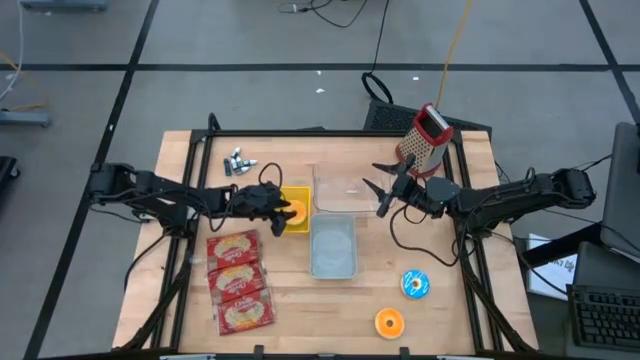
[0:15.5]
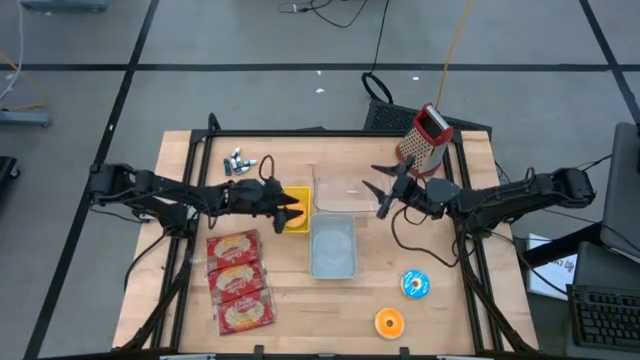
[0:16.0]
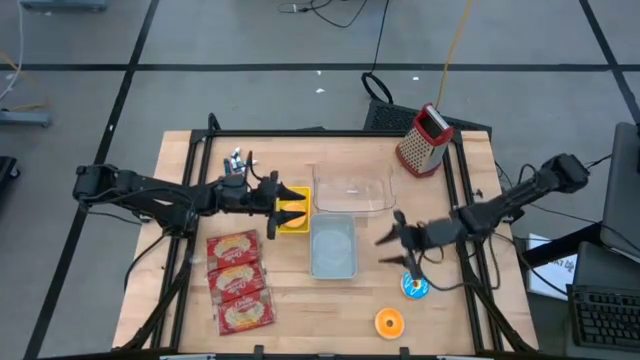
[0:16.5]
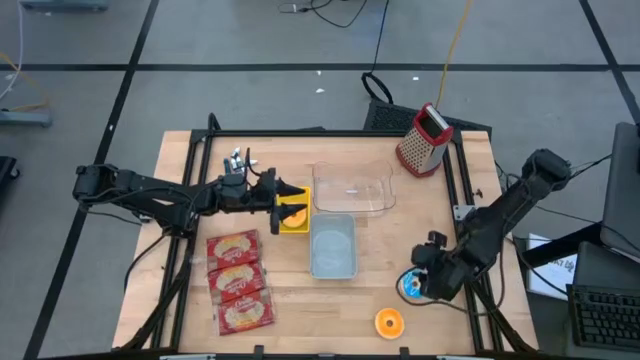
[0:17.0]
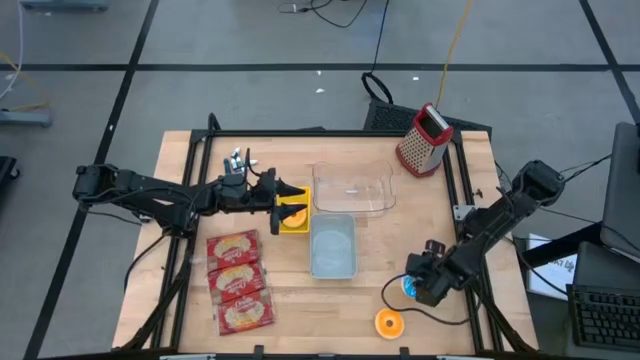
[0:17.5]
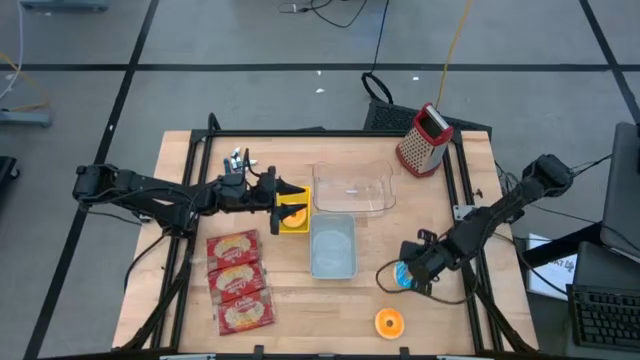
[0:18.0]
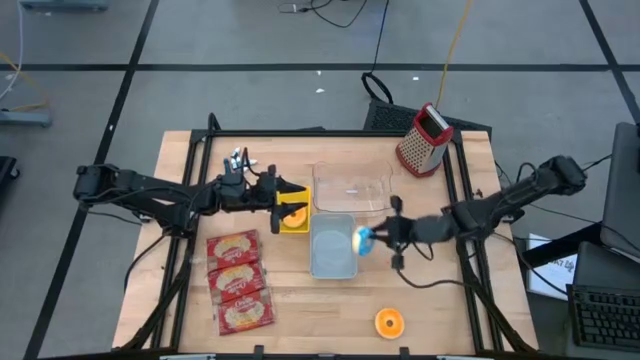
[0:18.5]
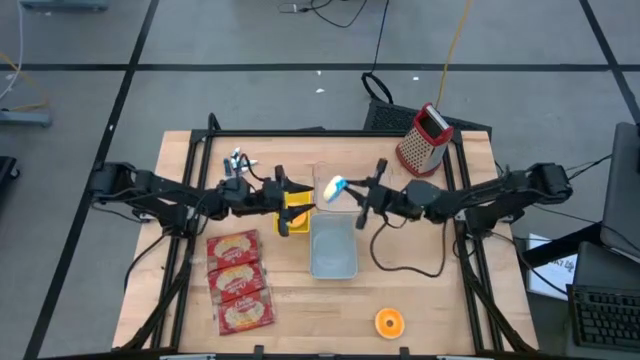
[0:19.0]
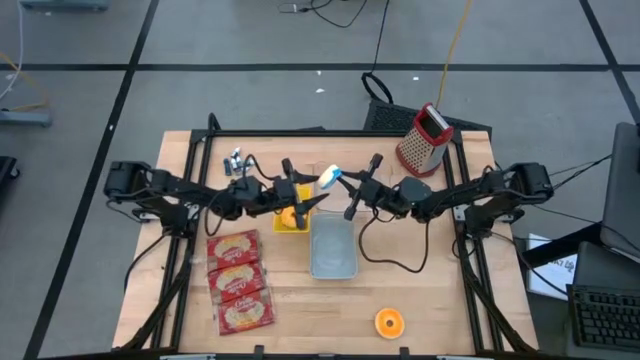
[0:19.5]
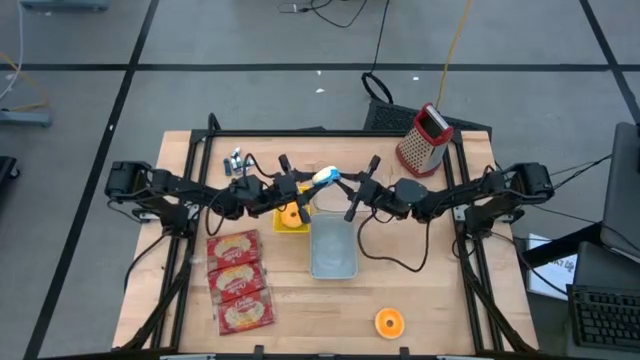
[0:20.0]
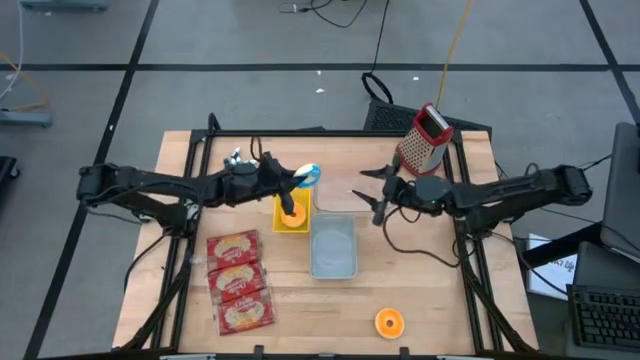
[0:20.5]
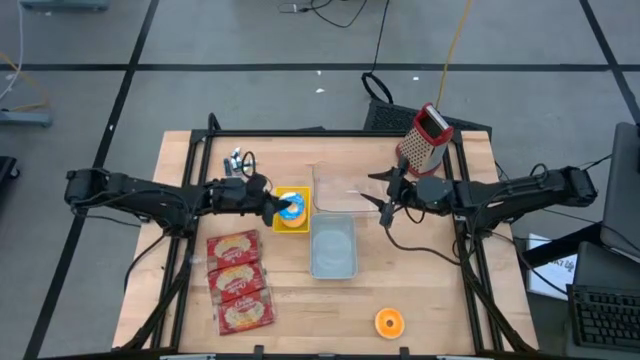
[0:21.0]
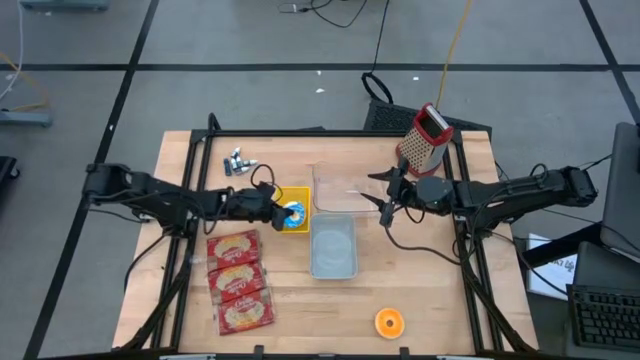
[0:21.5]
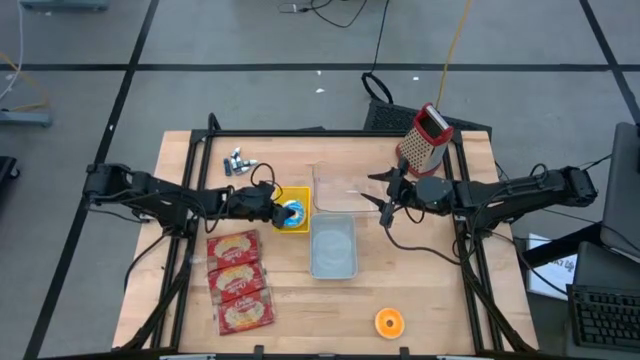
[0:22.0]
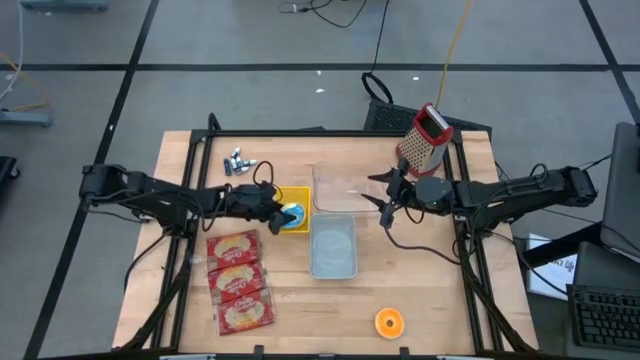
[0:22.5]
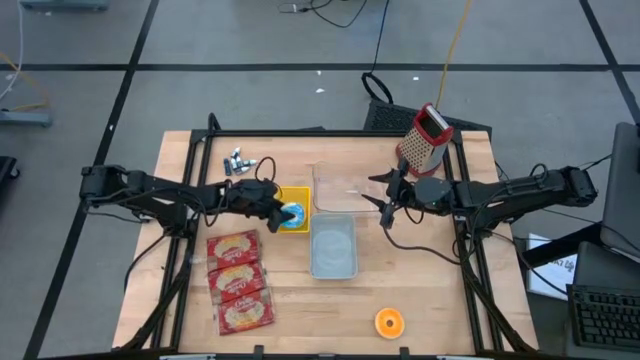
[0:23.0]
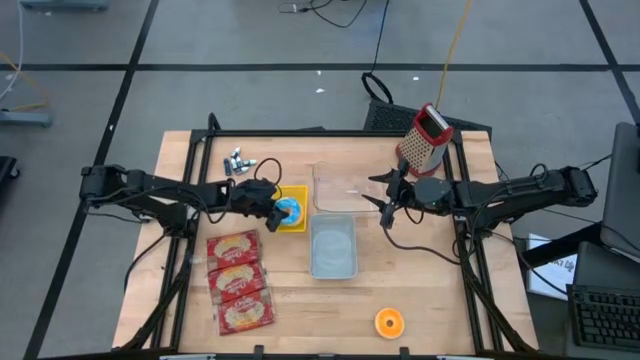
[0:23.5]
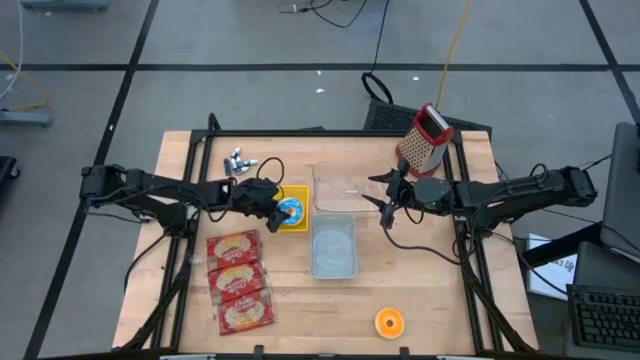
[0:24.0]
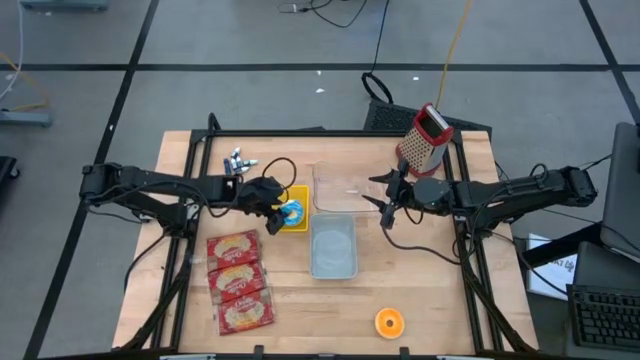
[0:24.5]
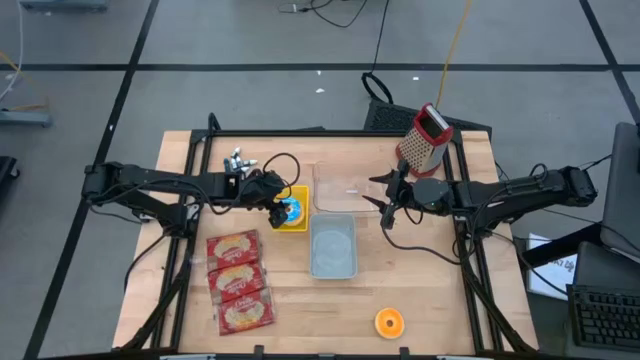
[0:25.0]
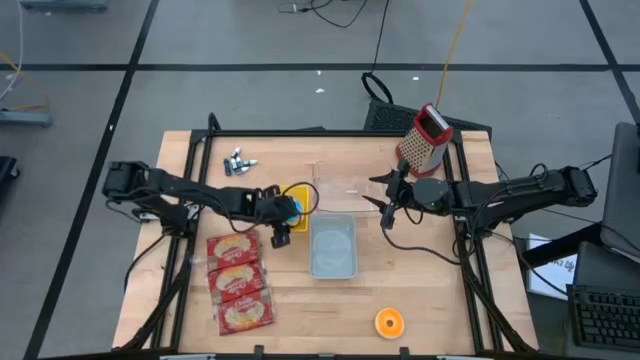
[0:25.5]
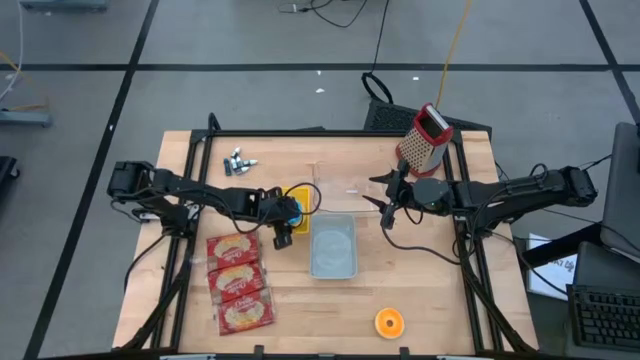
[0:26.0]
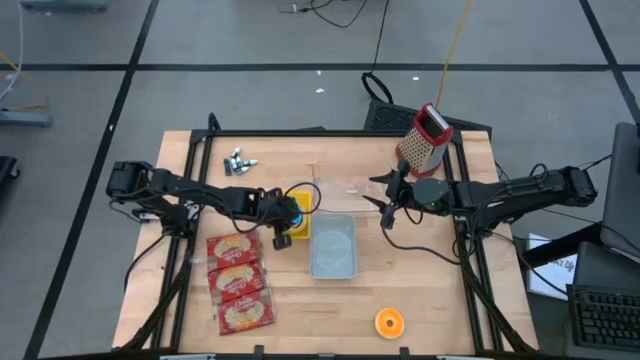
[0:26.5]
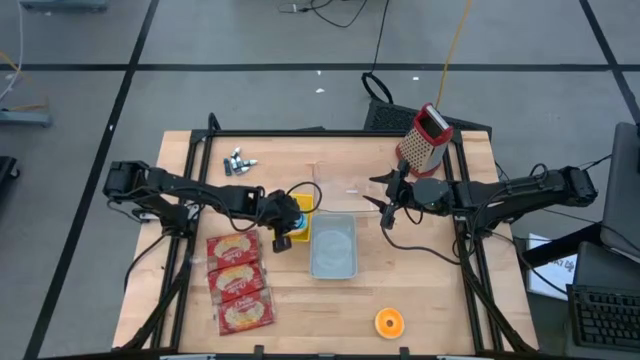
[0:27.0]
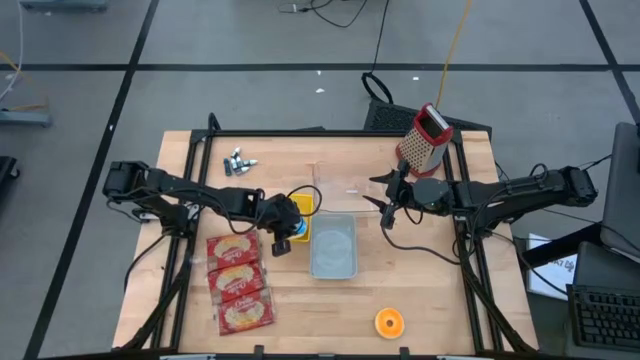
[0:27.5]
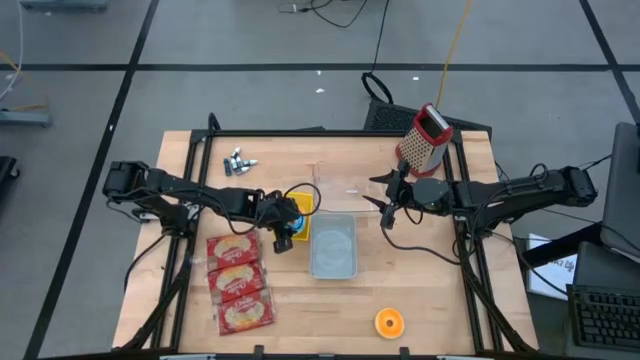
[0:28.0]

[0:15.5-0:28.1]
Put the blue doughnut into the yellow bin

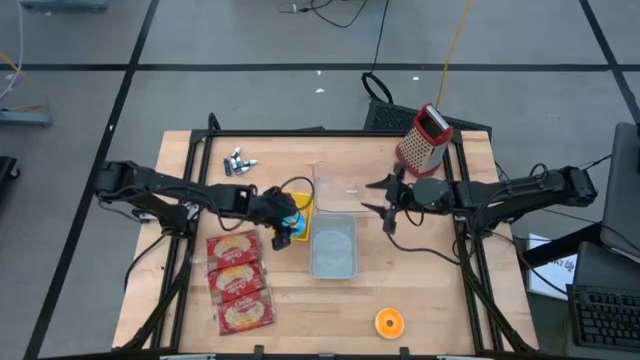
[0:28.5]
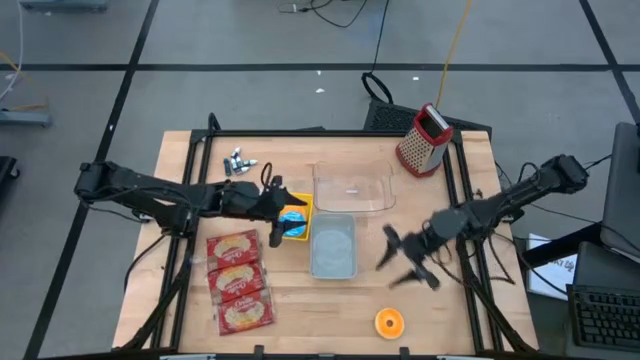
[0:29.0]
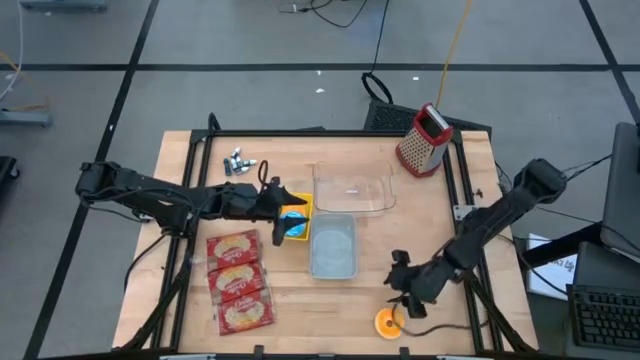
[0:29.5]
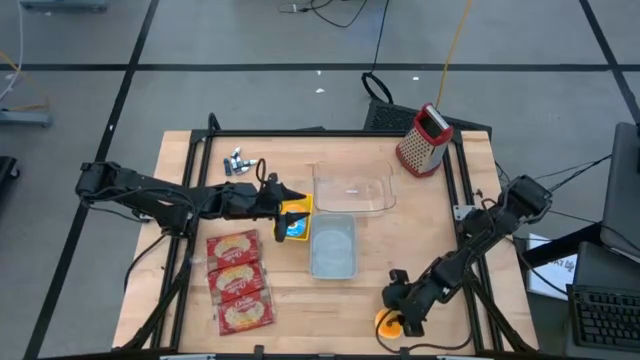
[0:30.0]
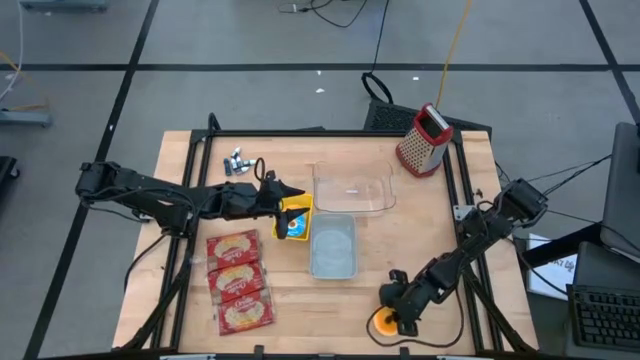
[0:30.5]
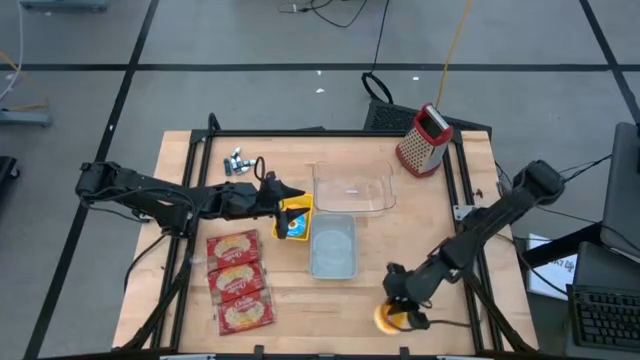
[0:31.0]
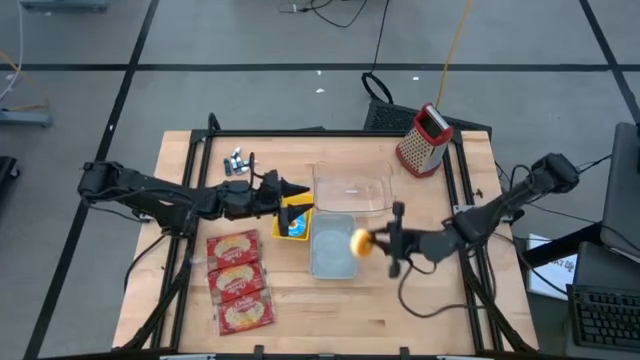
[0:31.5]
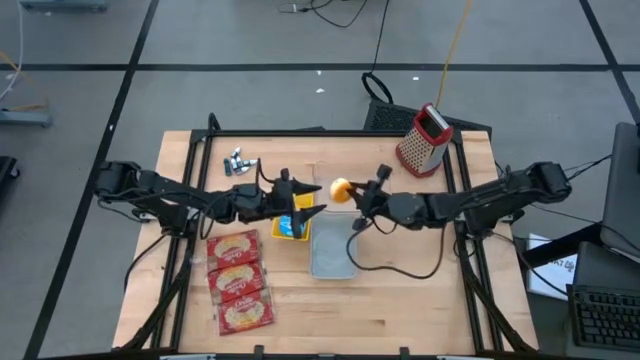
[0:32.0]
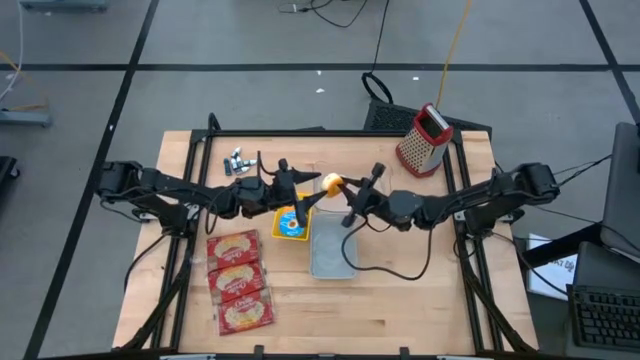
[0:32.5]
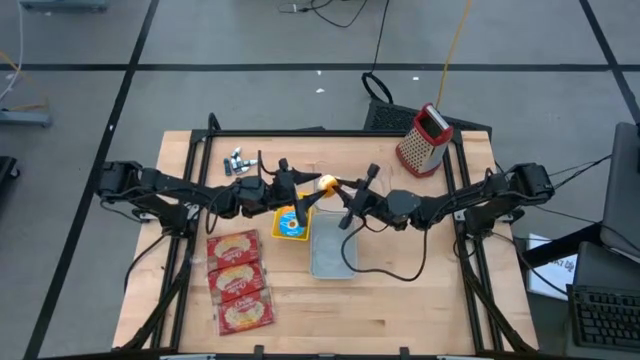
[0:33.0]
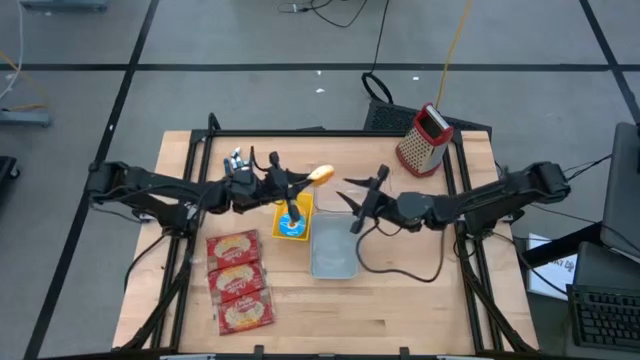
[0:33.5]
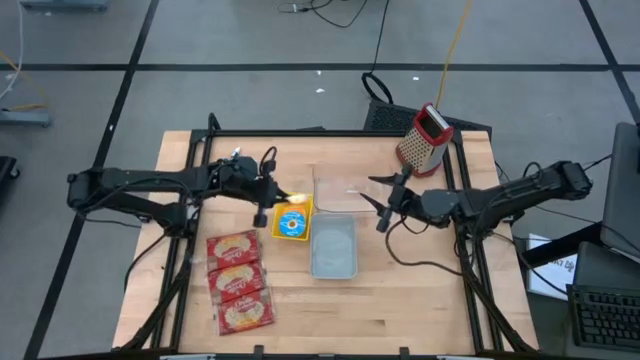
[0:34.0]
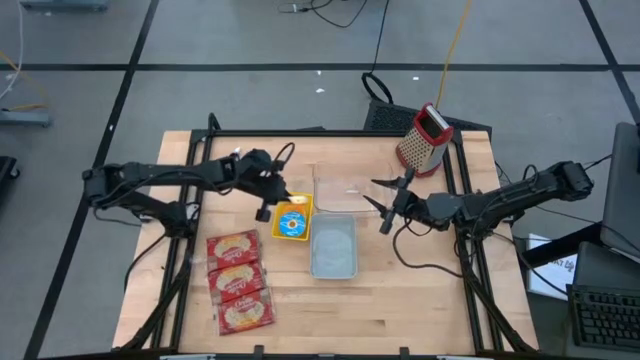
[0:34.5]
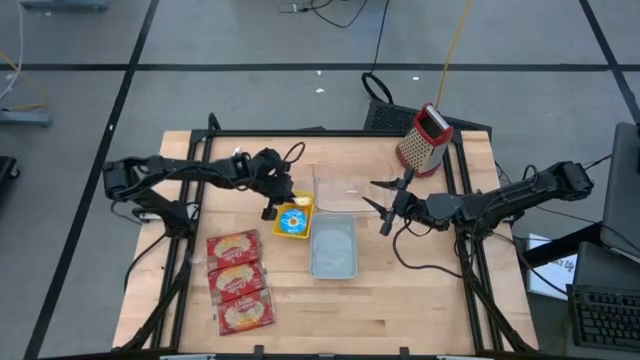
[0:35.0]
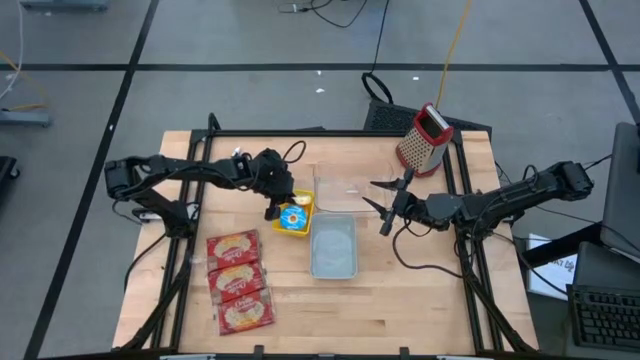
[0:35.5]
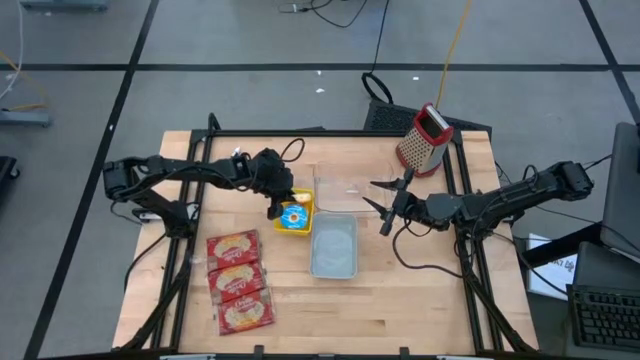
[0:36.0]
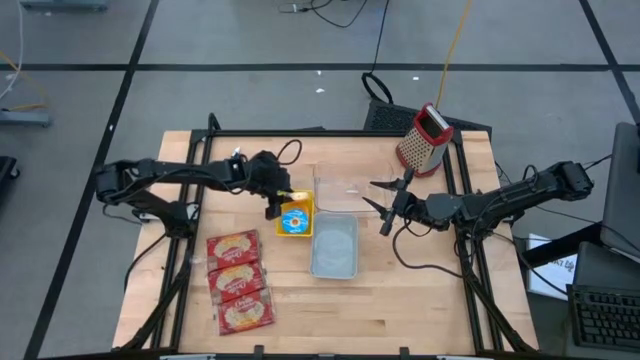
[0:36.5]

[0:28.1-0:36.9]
Put the light blue doughnut into the yellow bin
